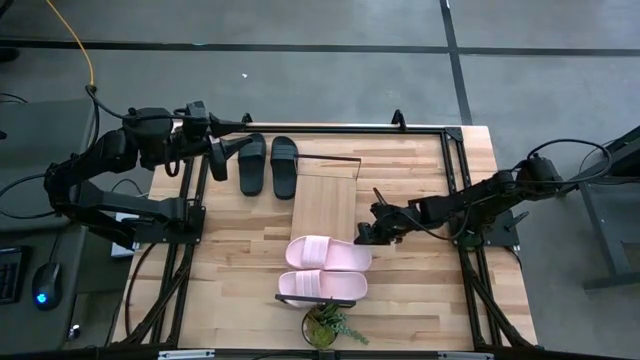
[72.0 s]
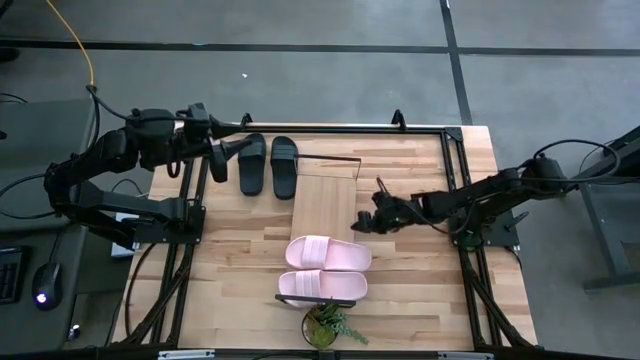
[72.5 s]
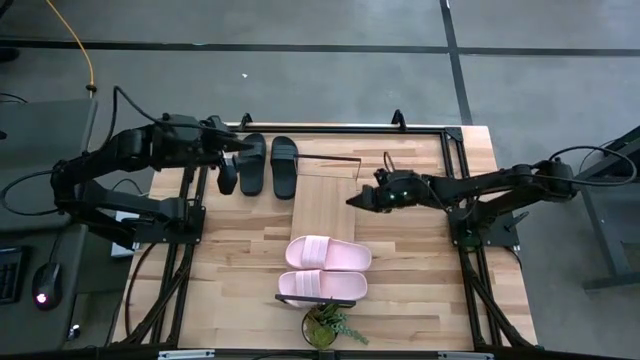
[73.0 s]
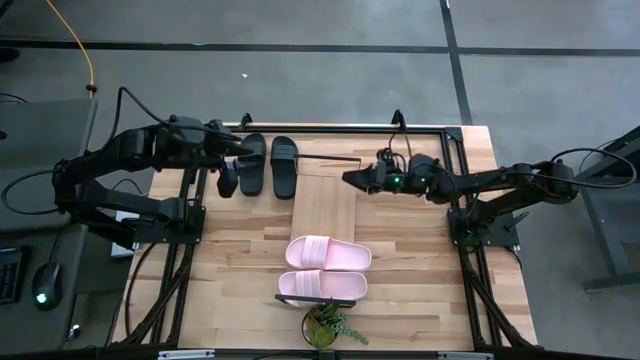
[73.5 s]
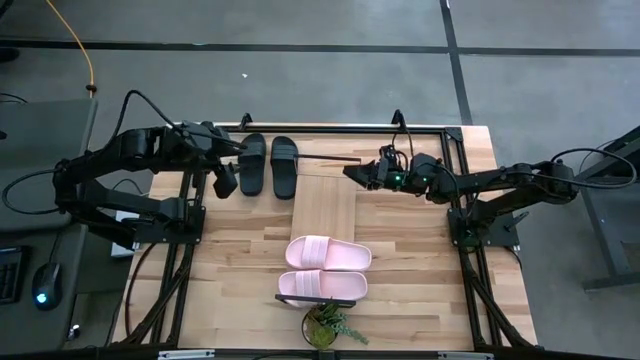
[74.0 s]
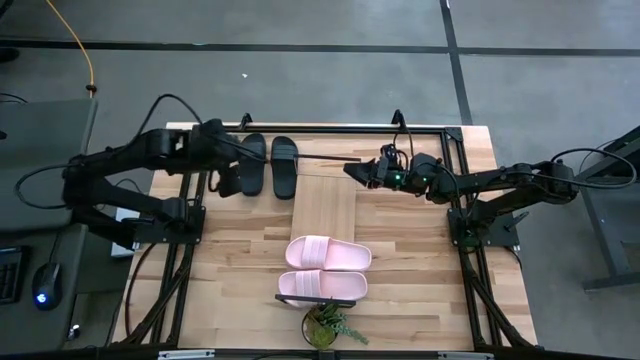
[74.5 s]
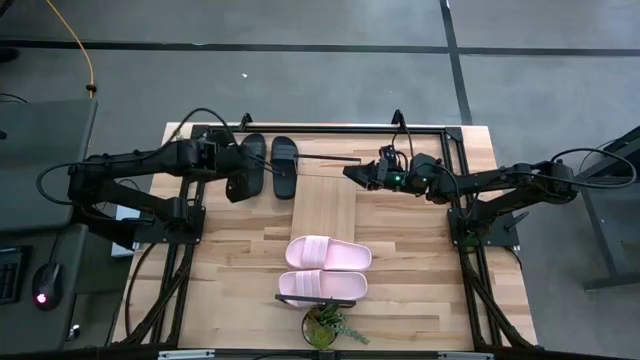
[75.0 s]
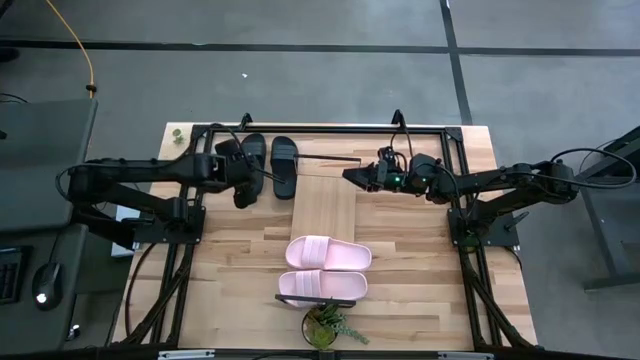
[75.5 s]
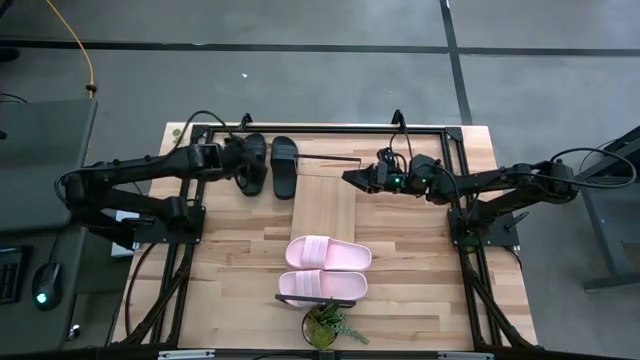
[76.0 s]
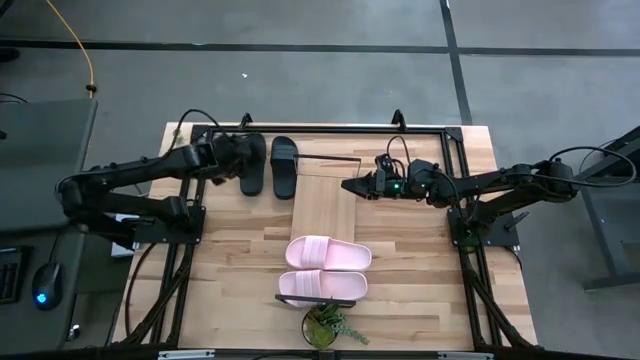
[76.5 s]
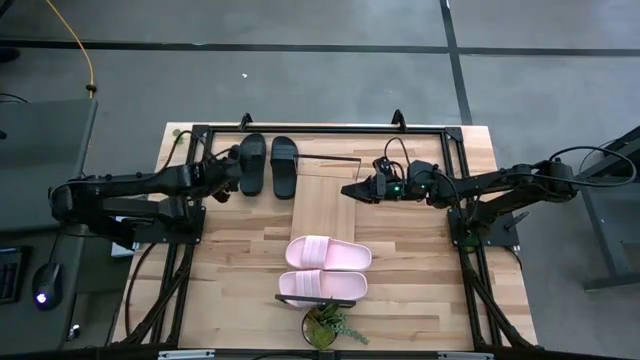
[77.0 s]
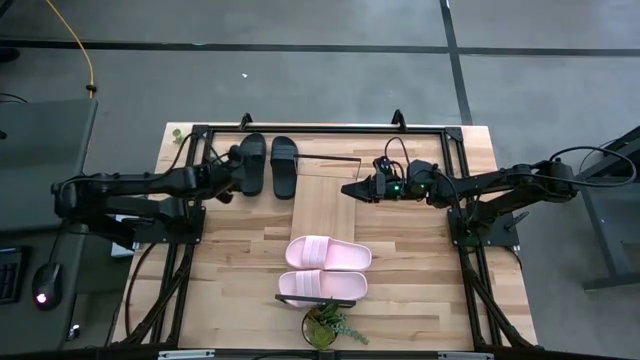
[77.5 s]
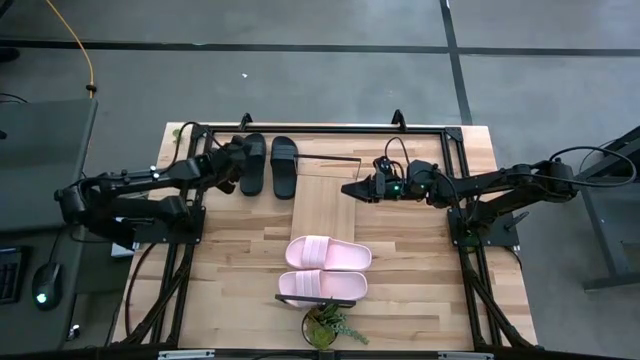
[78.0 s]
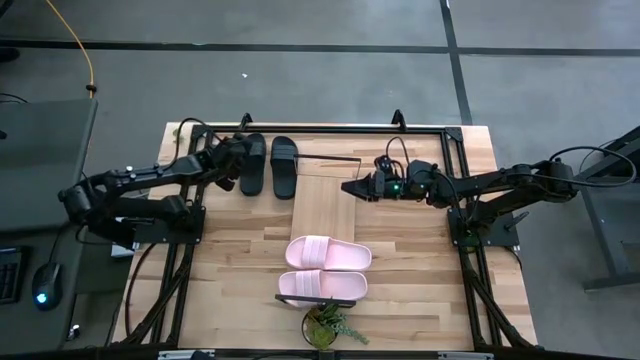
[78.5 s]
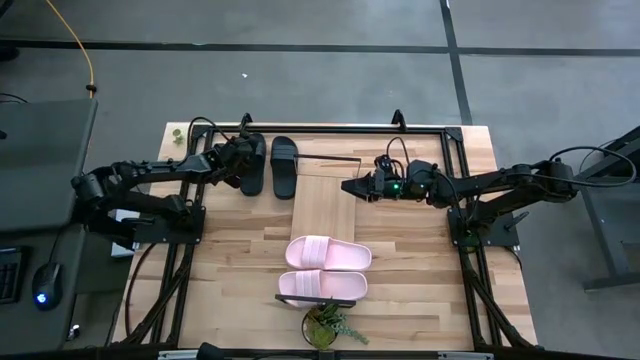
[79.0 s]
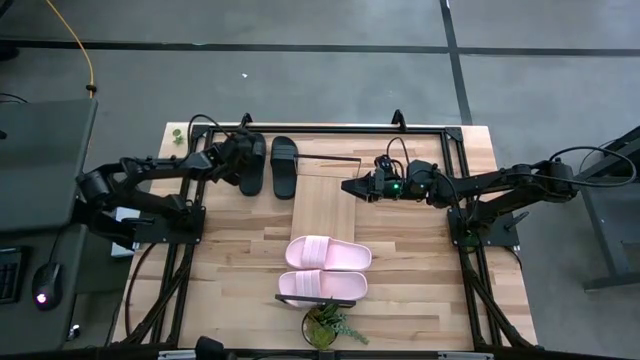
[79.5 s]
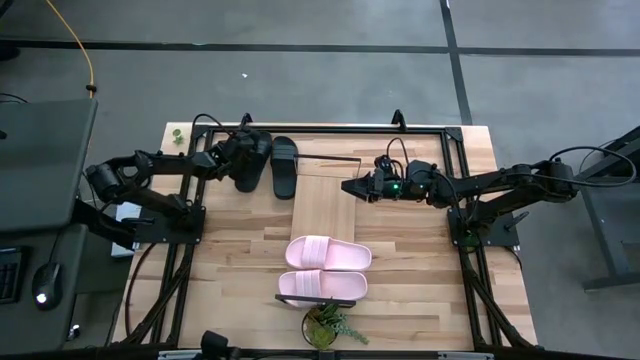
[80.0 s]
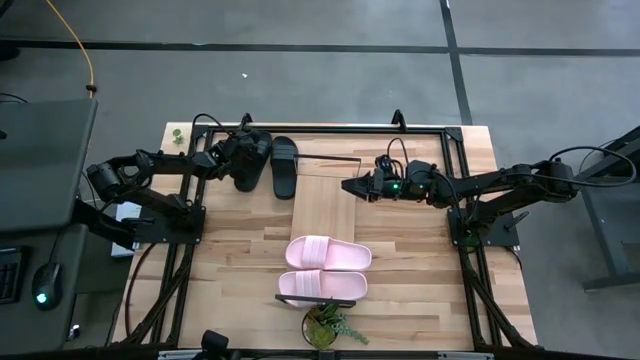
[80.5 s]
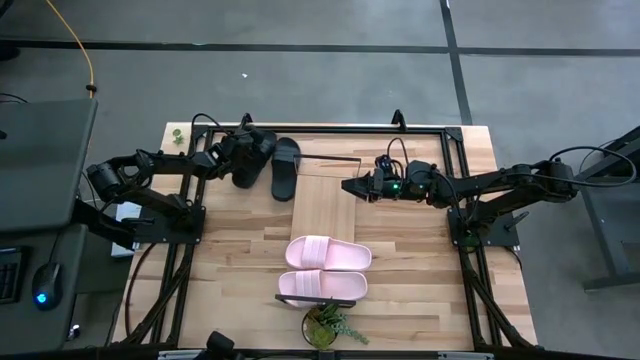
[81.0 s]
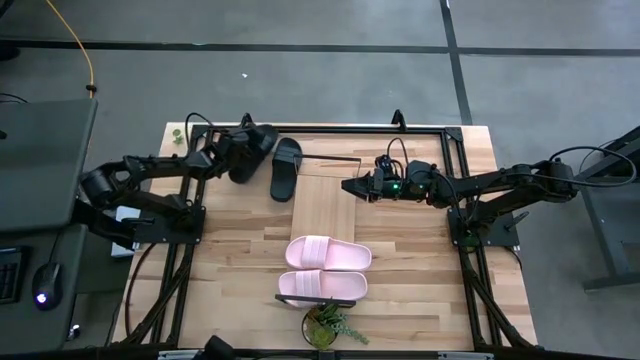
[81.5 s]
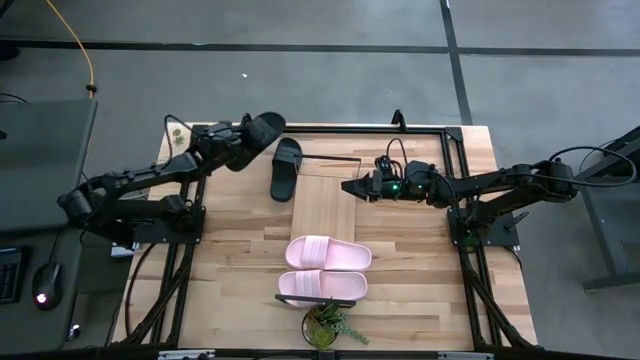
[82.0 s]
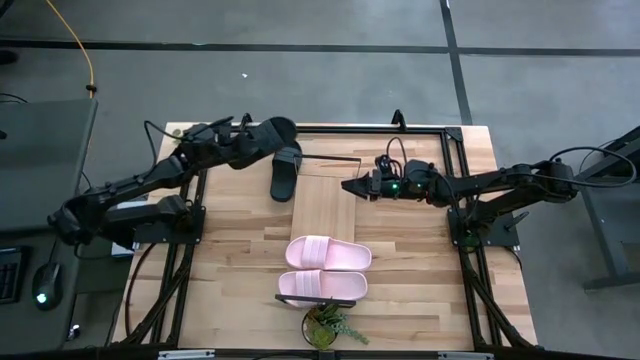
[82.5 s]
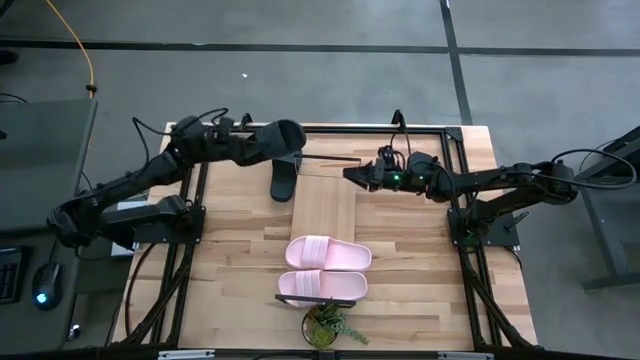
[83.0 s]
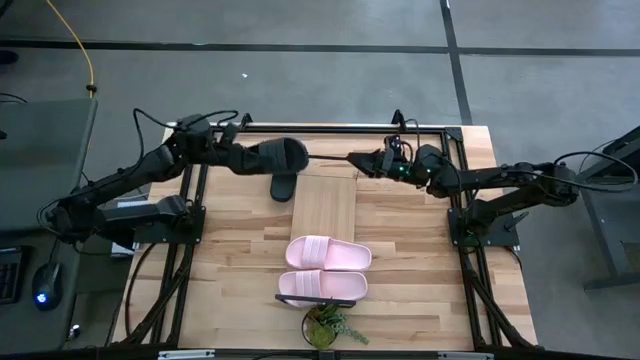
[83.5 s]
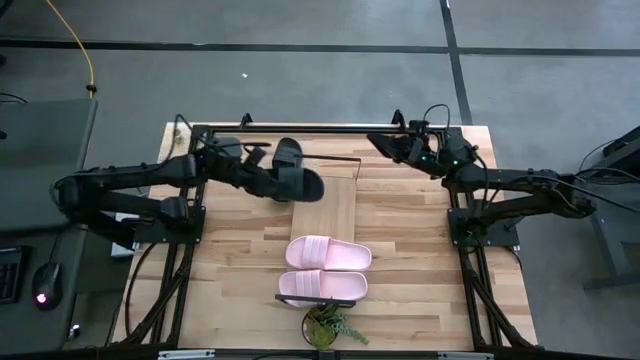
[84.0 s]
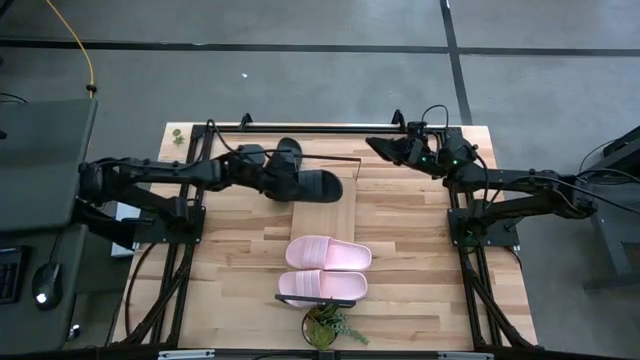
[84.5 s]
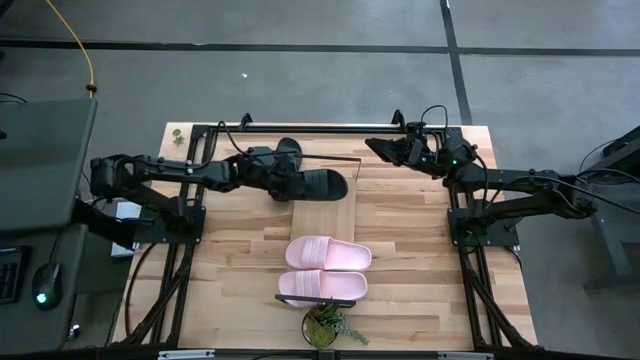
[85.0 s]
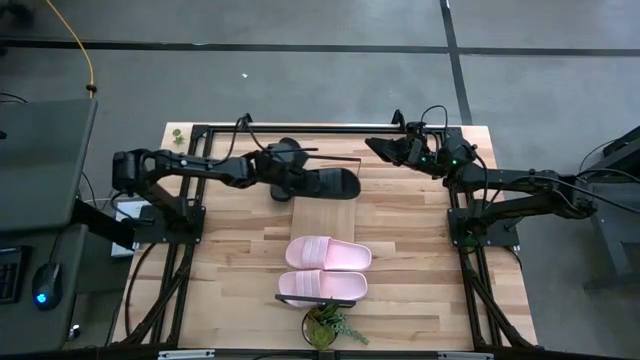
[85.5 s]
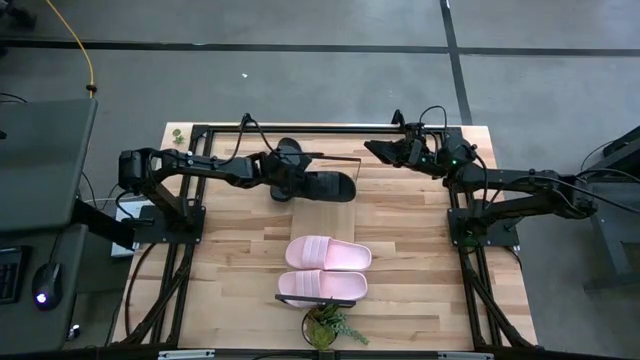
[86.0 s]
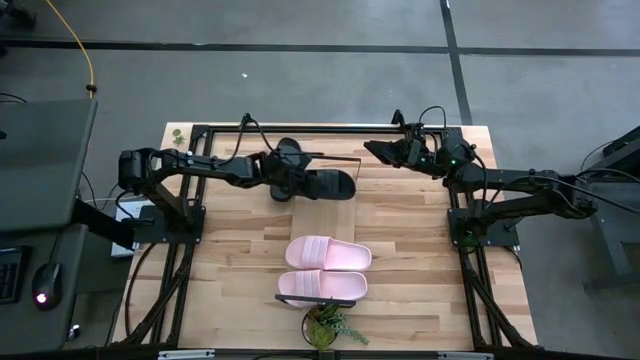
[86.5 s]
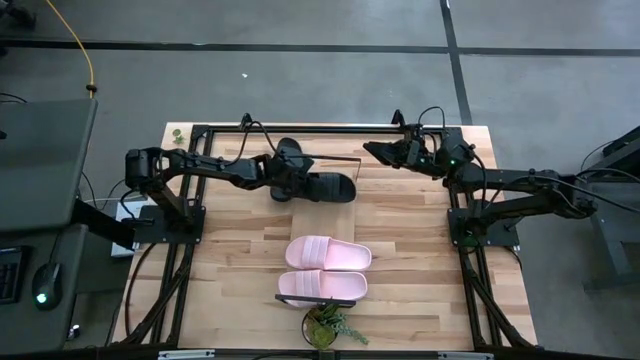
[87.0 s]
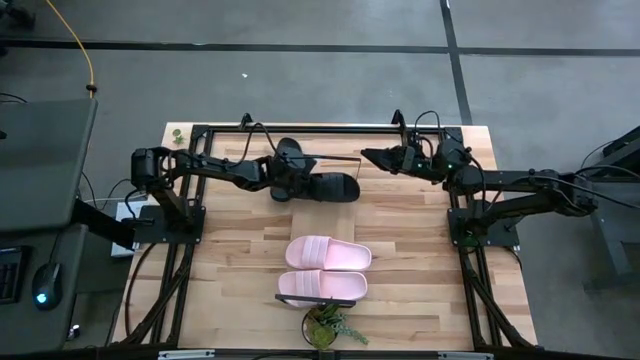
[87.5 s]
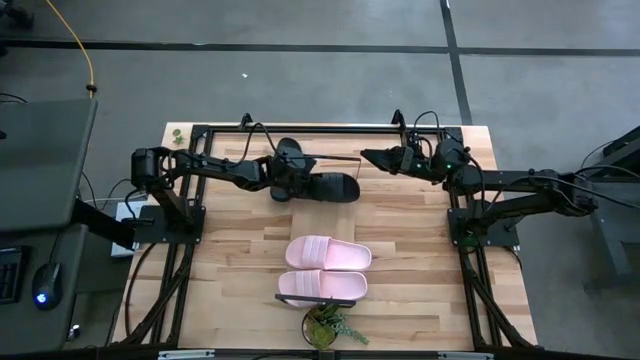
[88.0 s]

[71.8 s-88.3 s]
Task: Pick and place slides into the shelf
Put the left black slides on the shelf

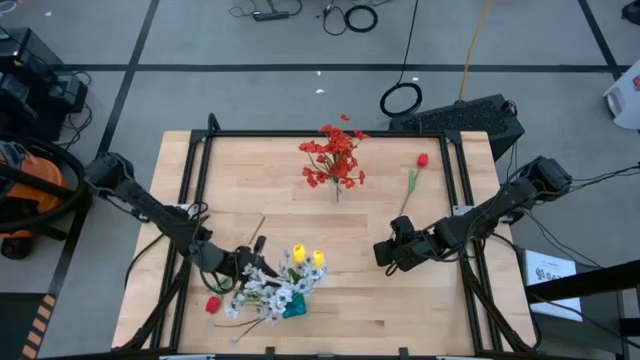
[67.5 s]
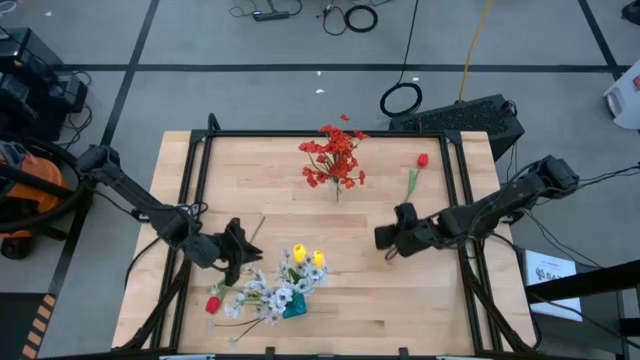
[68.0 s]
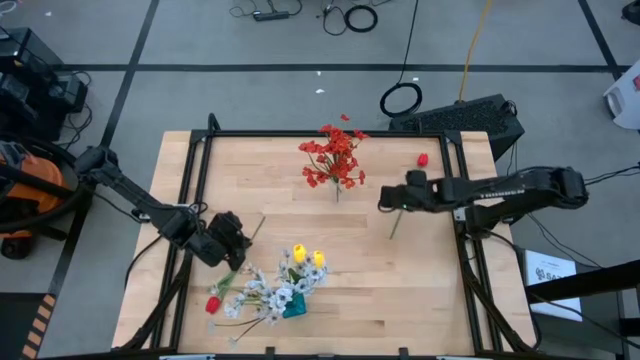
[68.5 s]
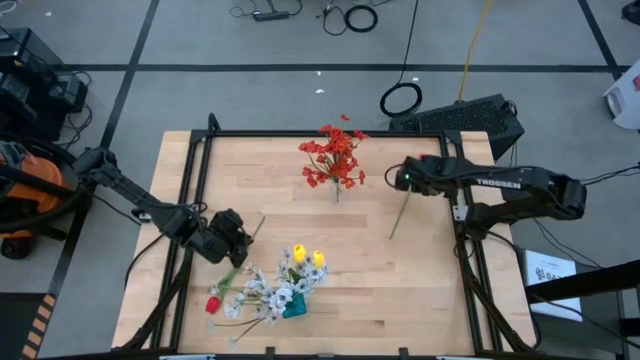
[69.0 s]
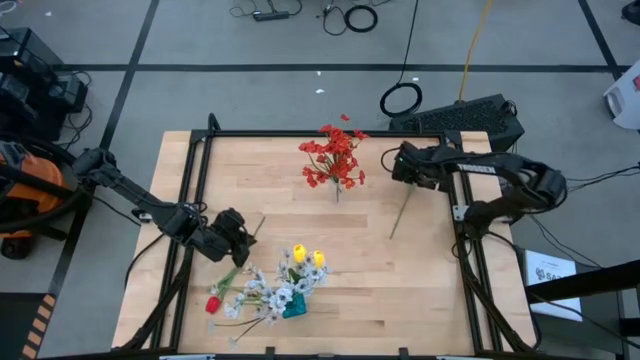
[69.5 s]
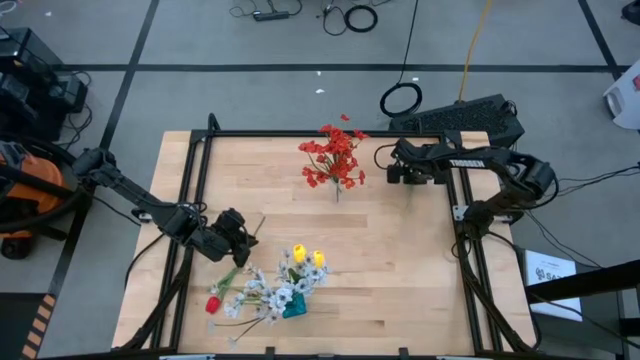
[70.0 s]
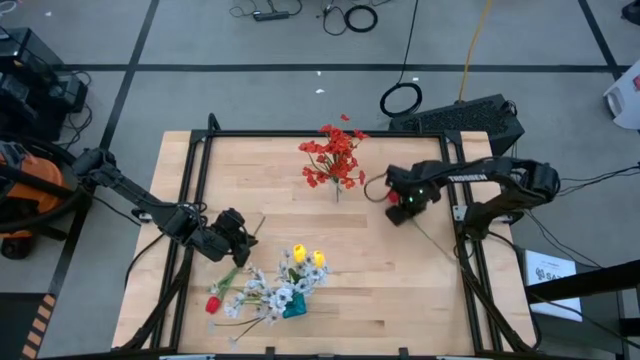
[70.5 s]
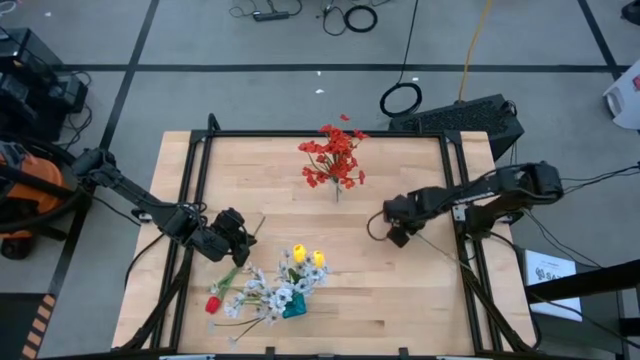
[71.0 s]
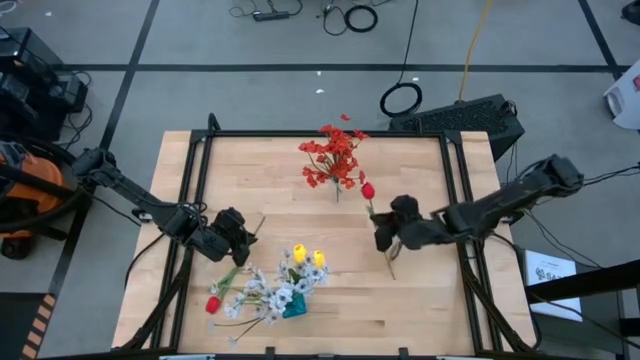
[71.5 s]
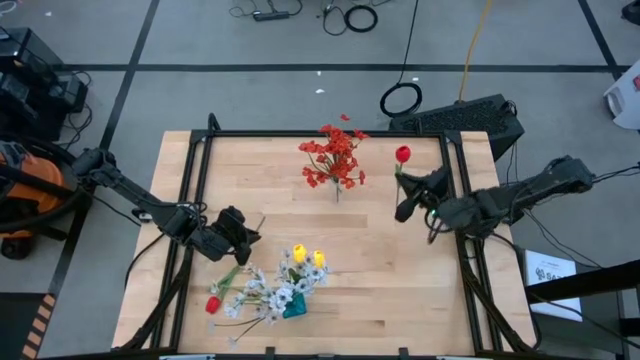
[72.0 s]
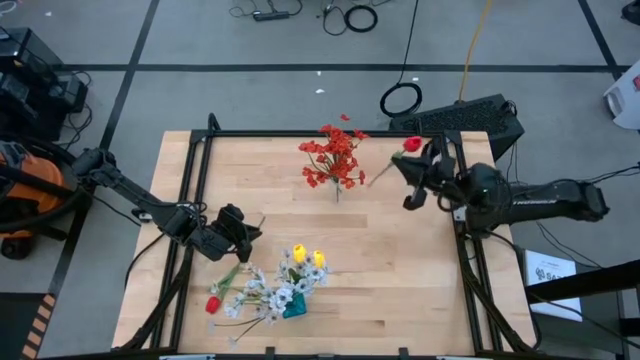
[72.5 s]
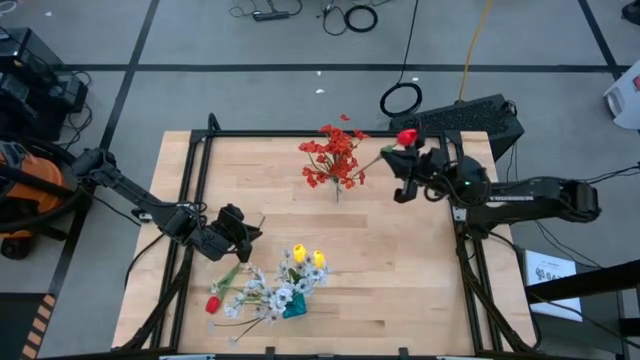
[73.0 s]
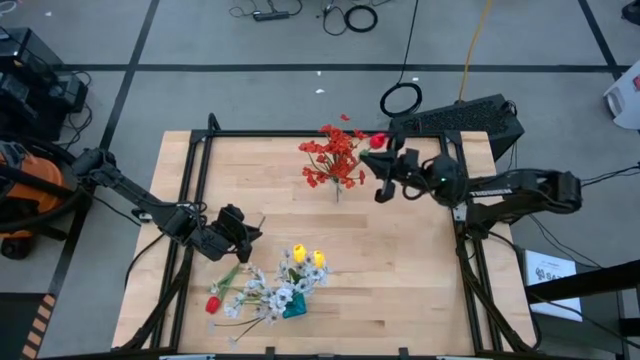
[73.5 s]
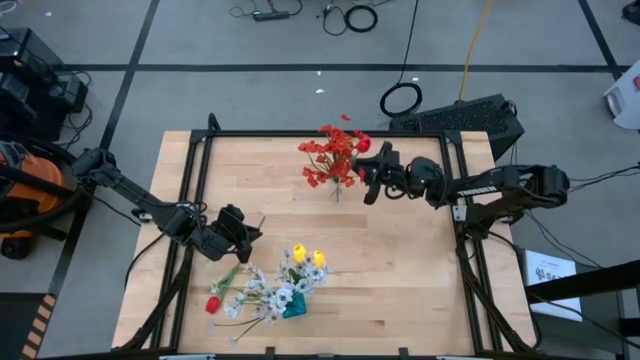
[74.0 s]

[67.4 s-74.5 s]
Task: Sort flowers into vase by color
Put the top red tulip into the transparent flower vase
